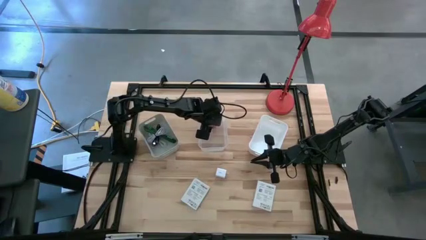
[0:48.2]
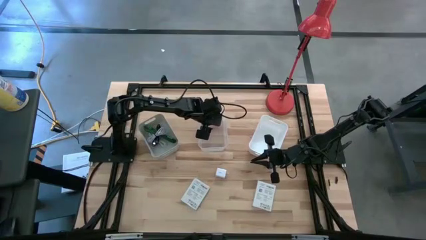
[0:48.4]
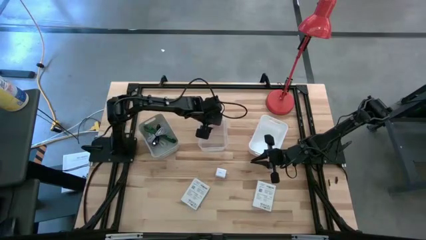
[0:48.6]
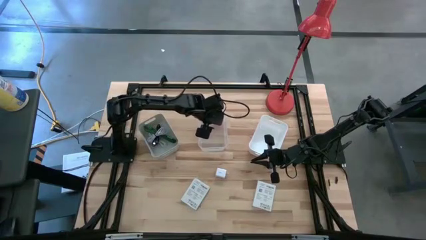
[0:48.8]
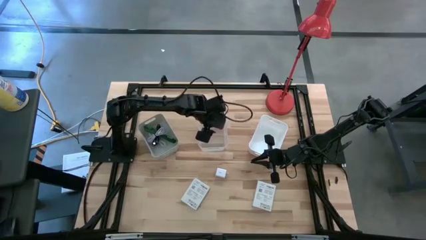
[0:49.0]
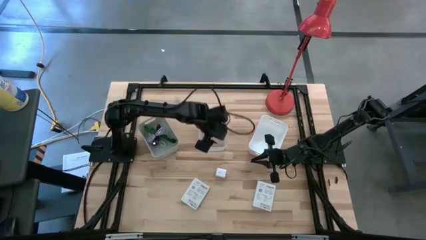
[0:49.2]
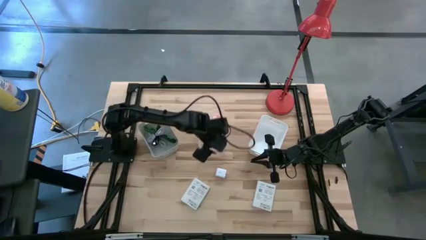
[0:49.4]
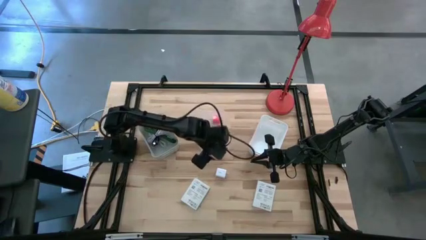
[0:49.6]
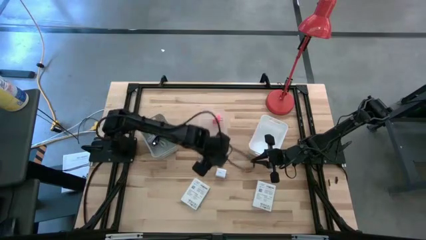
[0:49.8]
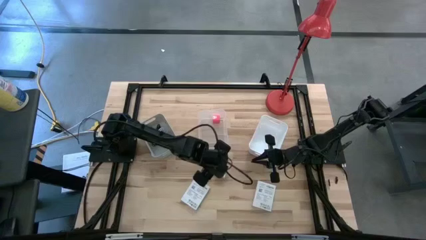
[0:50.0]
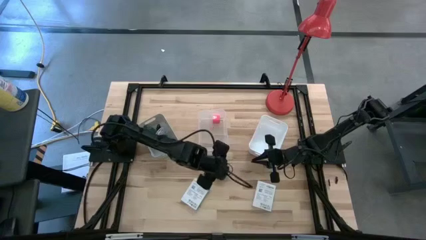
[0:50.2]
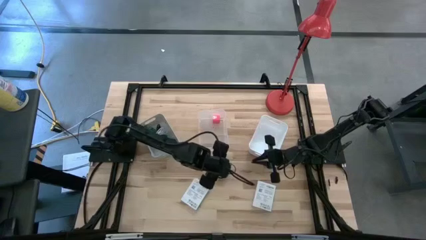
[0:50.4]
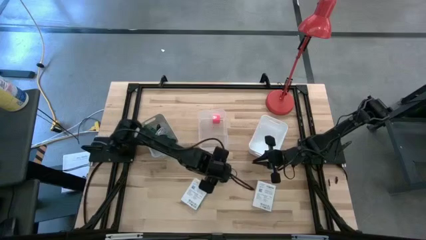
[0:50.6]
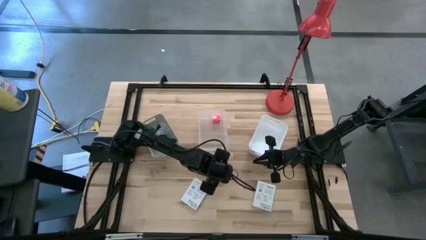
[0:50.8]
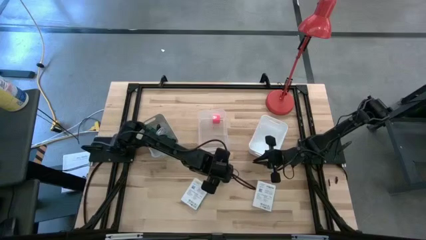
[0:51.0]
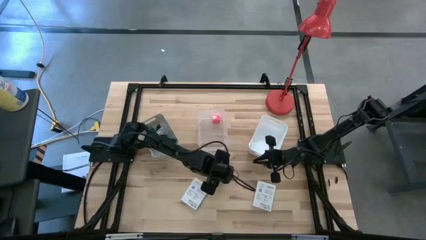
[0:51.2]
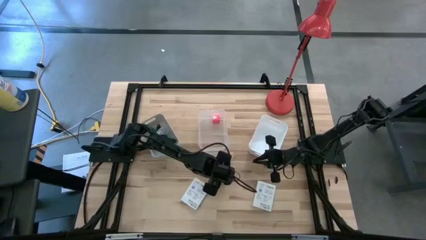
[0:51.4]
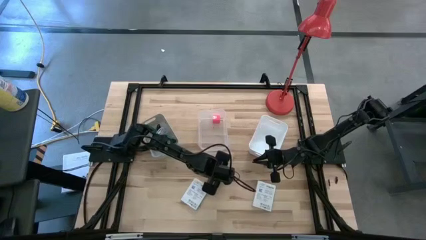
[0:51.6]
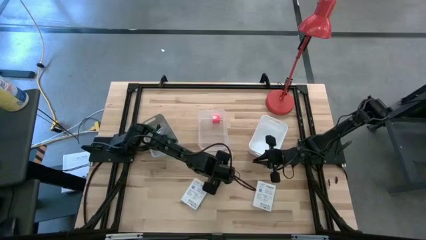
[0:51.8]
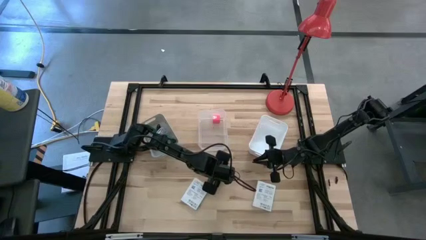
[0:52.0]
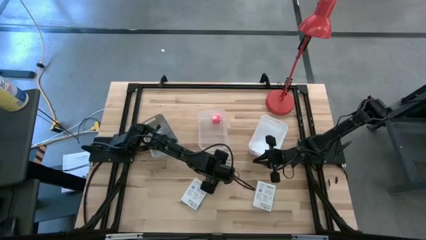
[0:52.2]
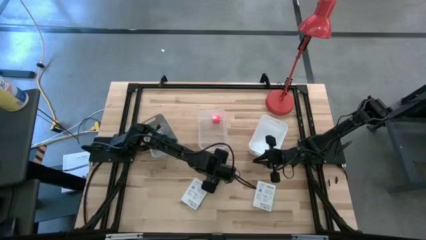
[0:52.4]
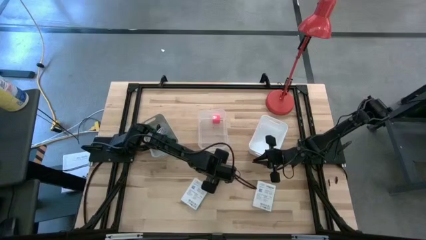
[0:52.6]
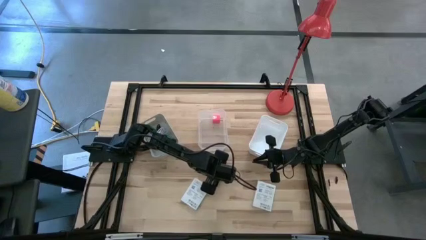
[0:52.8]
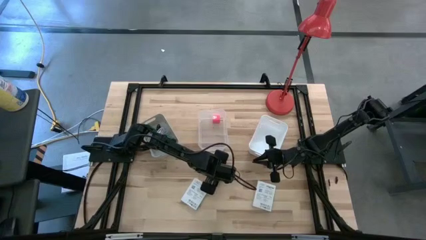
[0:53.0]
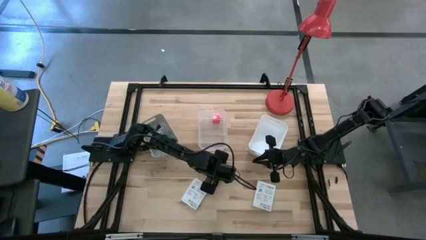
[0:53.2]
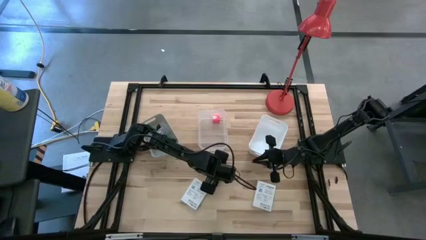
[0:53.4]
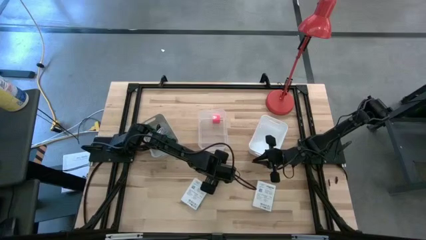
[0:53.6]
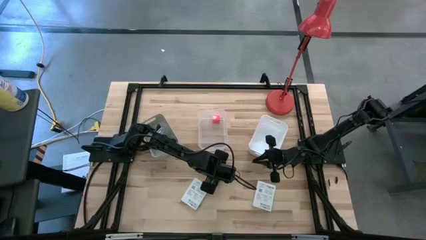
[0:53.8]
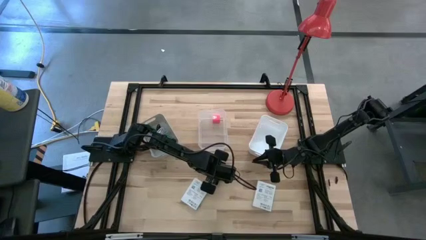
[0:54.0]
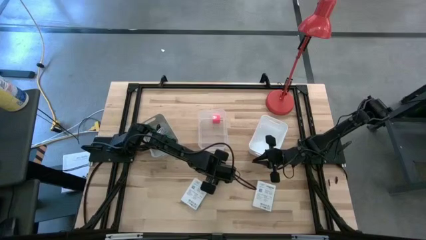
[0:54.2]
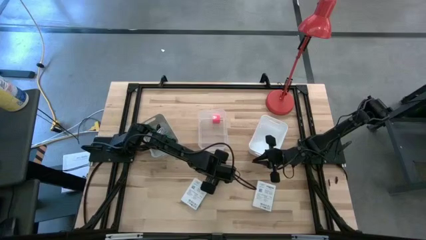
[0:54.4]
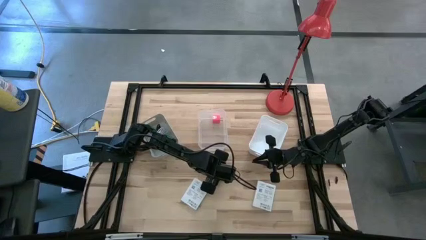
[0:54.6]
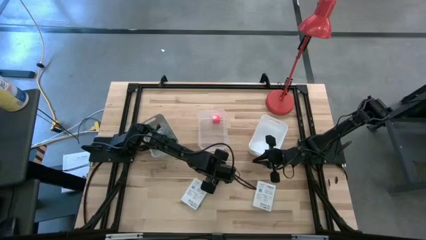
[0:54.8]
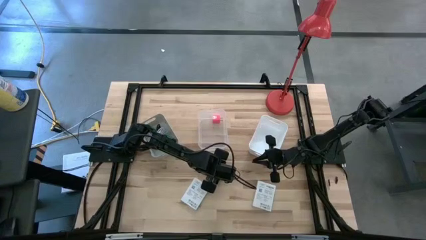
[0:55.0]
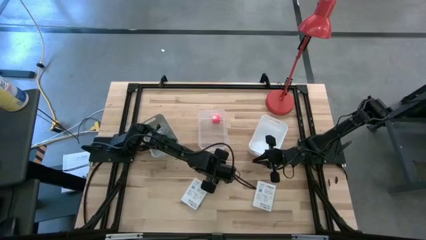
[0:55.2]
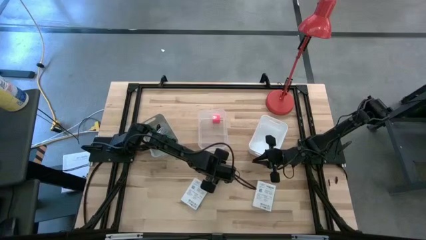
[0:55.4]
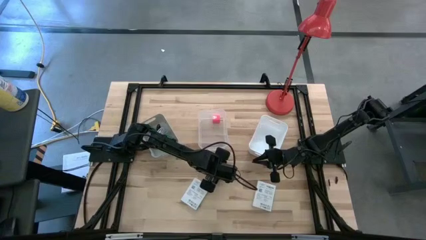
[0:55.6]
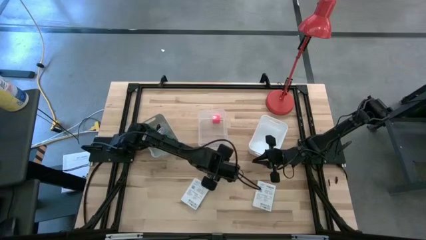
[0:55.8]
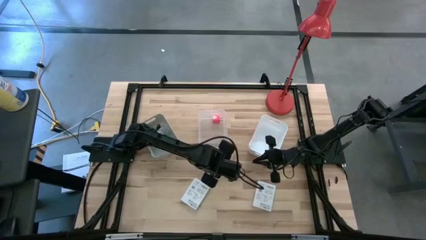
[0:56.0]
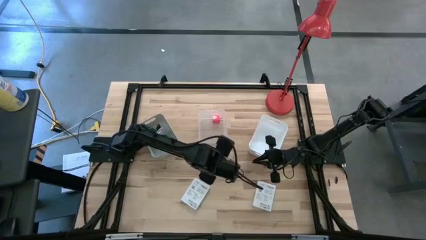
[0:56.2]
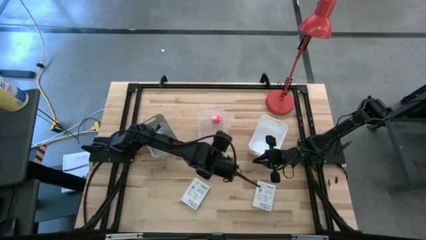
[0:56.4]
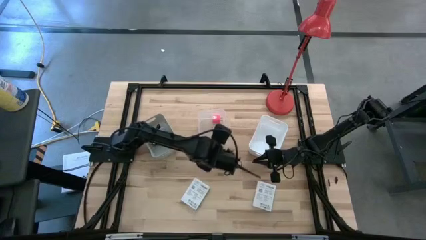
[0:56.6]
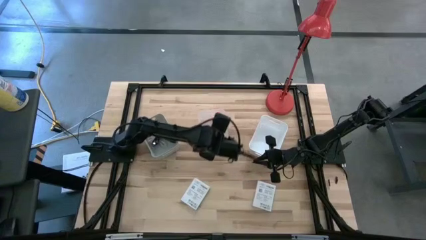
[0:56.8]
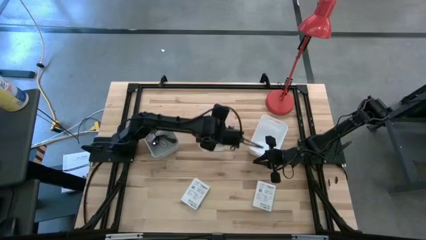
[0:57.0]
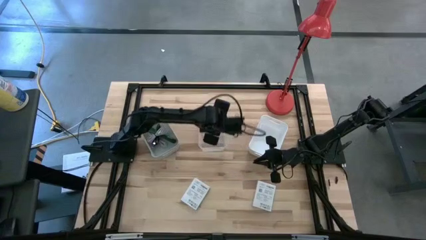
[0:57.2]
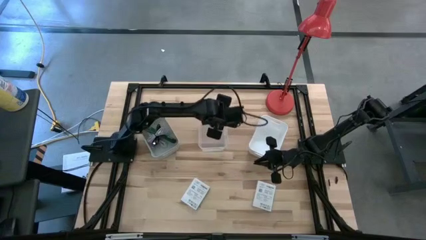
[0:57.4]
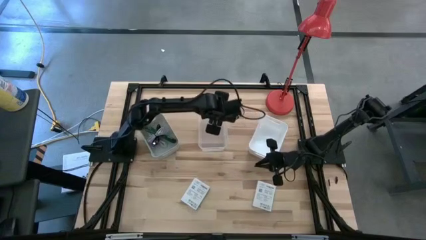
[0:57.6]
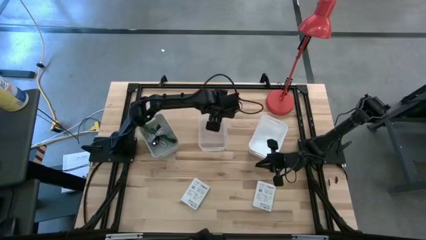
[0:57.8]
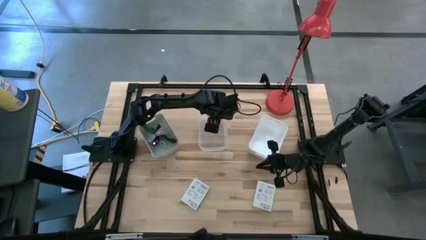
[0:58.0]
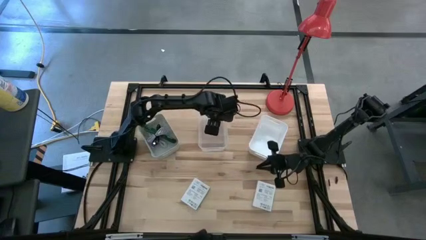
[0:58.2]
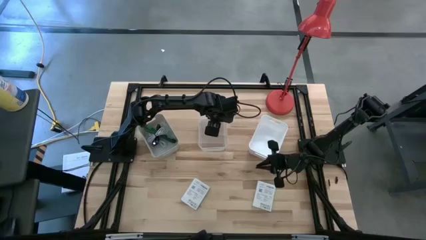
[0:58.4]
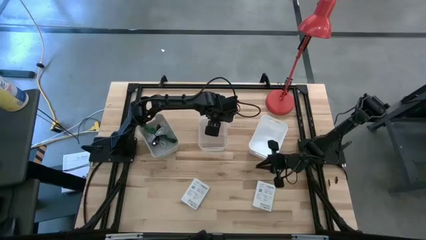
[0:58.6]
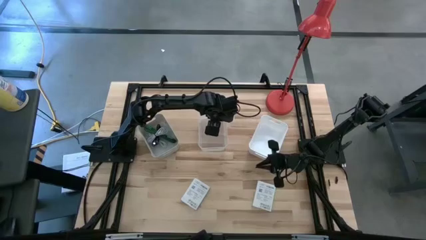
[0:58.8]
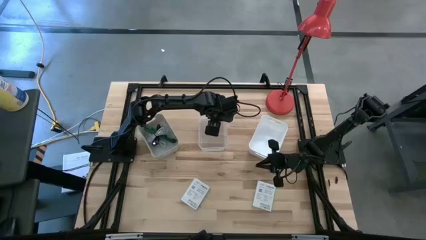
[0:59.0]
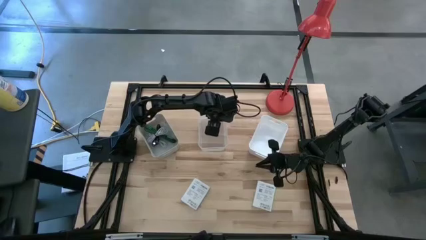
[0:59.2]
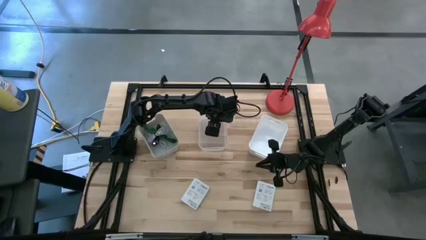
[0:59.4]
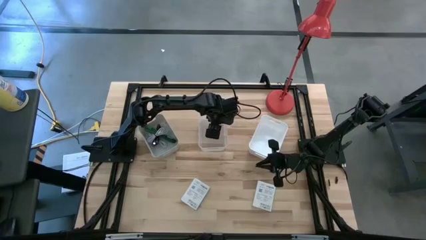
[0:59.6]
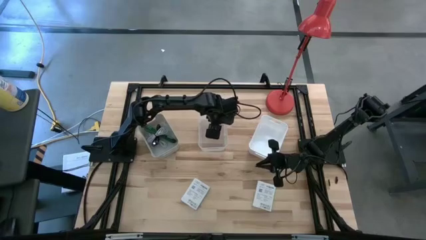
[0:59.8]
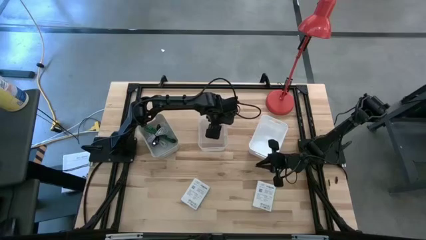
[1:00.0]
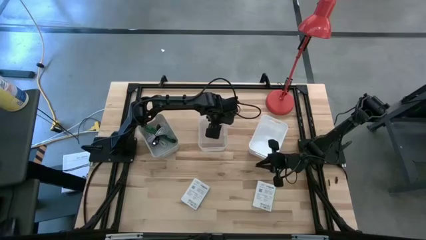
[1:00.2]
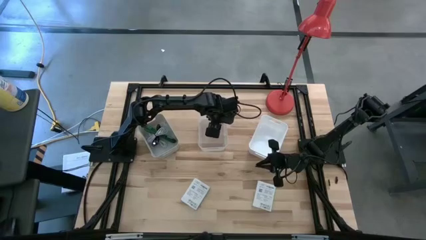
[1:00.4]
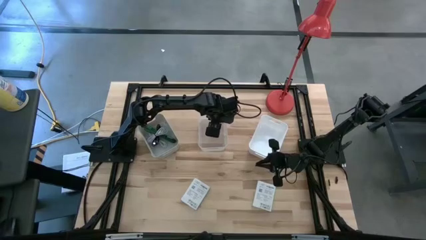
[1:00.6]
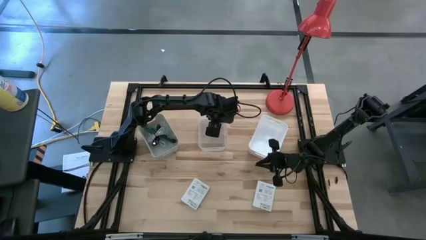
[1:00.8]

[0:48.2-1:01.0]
Task: Pick and place items into bin
Put the white charger adapter into the transparent bin

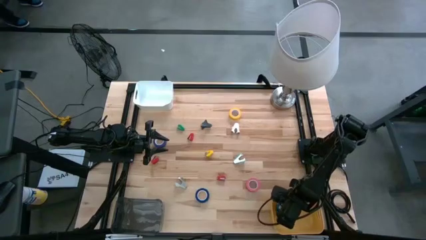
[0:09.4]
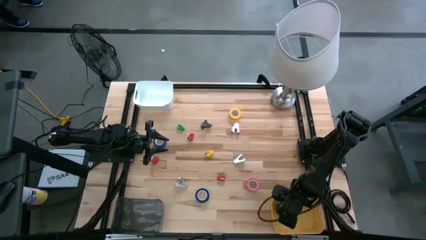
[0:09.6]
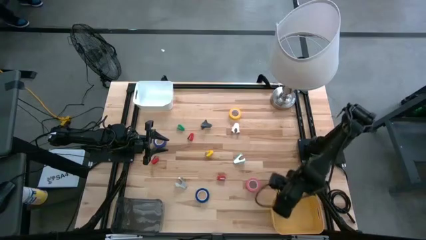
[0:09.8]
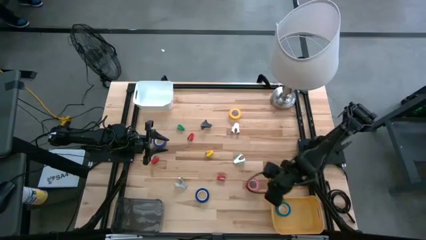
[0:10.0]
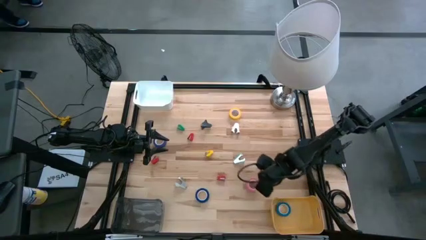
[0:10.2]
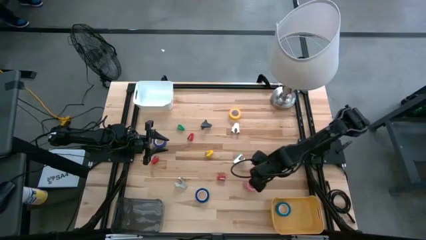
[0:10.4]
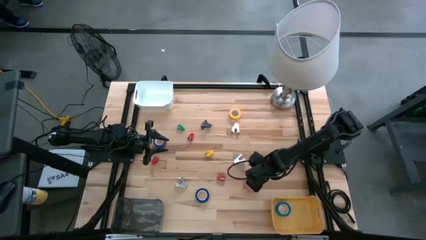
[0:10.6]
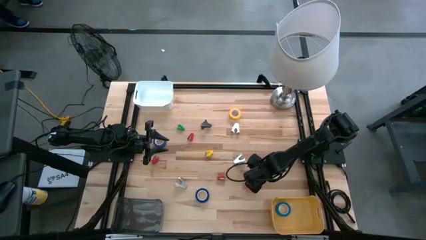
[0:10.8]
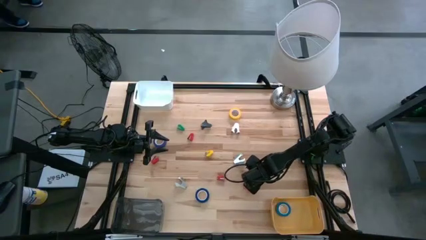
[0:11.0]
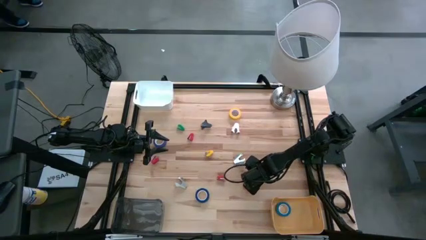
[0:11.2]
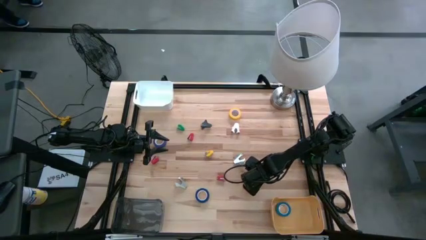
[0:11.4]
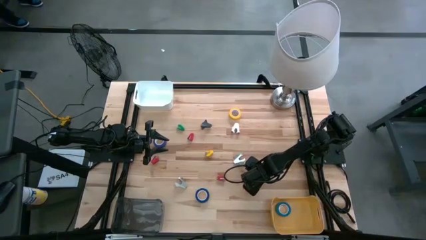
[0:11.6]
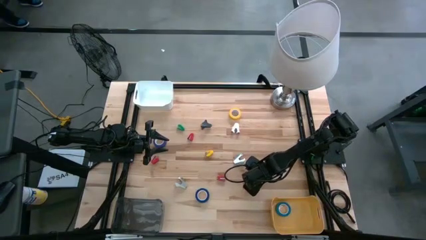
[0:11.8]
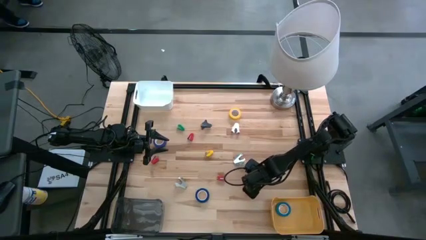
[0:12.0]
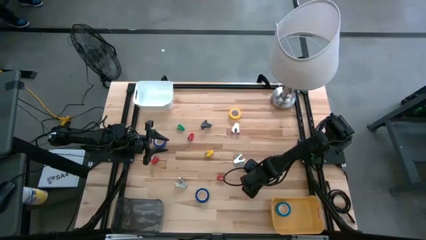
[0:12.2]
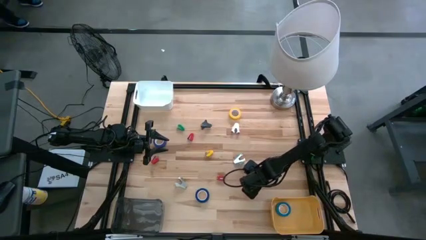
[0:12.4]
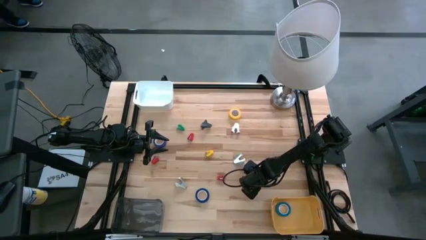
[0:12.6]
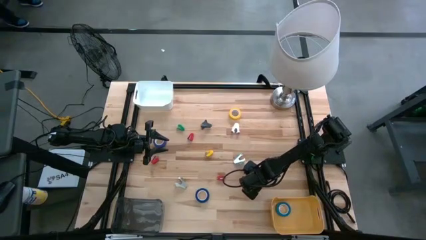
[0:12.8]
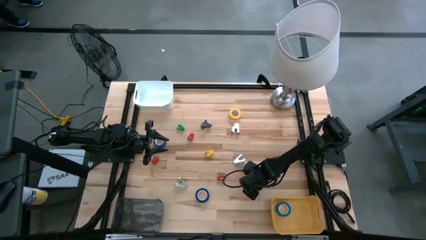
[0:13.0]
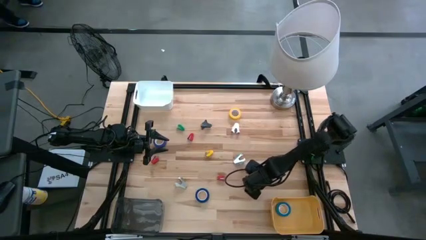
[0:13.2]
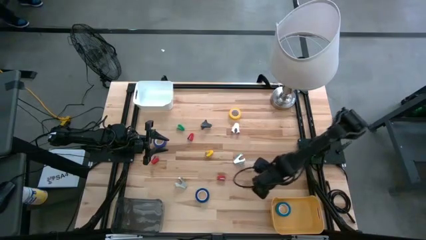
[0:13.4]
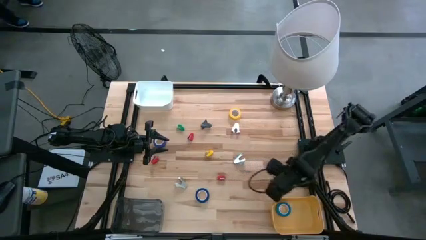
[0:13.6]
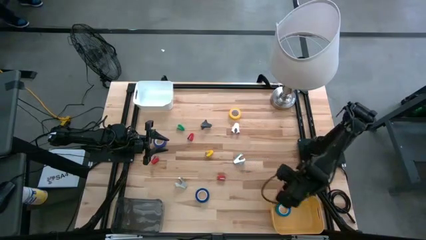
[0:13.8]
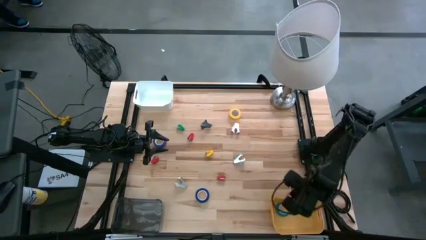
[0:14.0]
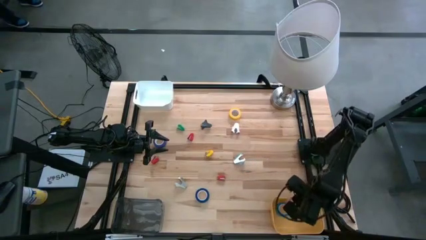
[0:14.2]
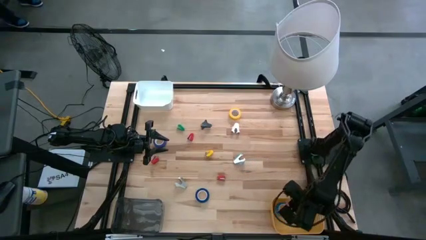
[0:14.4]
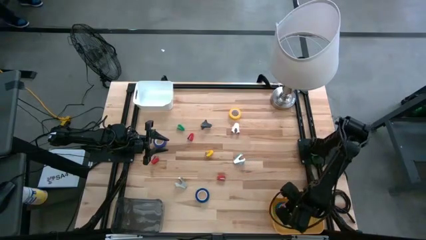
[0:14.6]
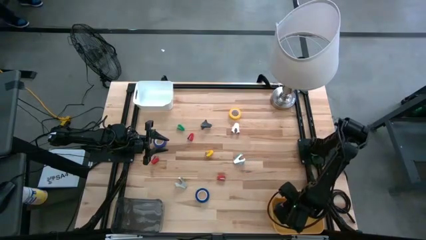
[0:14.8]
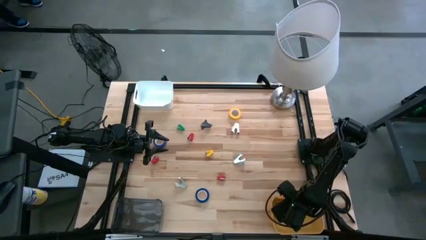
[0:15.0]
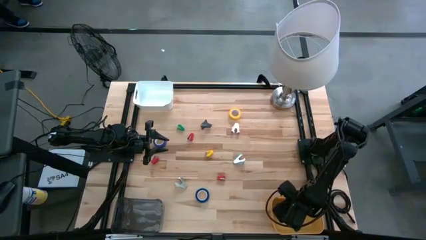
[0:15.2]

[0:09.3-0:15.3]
Task: Pick and place Stapler, Stapler remover, tape
Put the pink tape into the yellow bin
